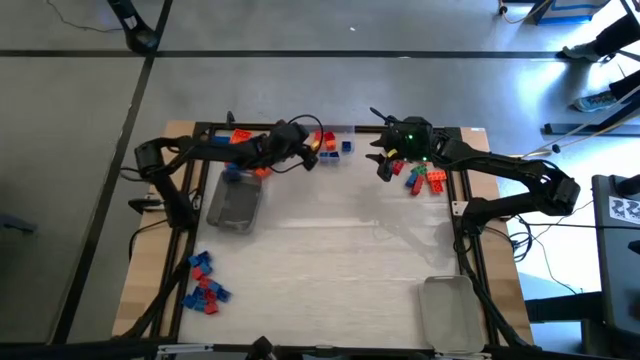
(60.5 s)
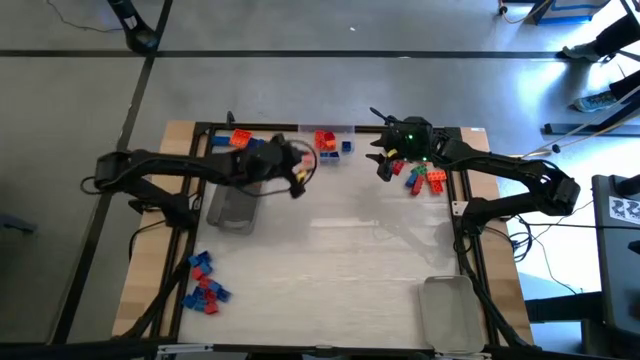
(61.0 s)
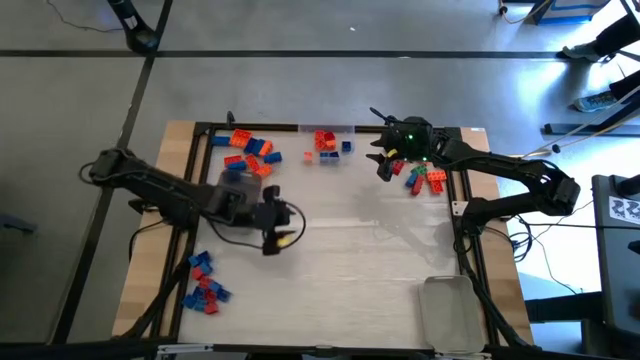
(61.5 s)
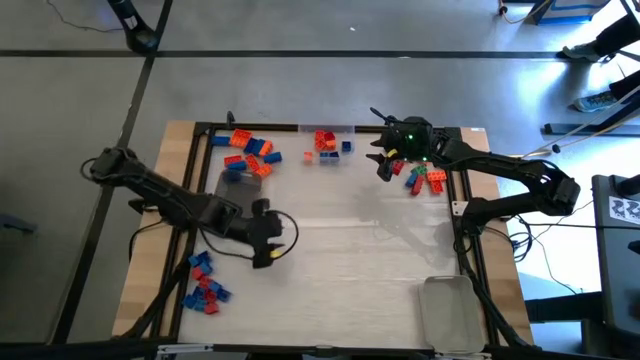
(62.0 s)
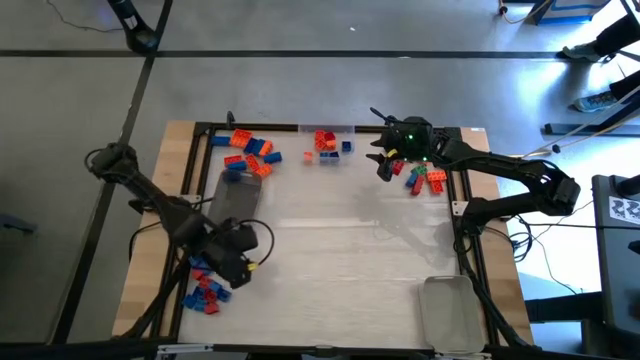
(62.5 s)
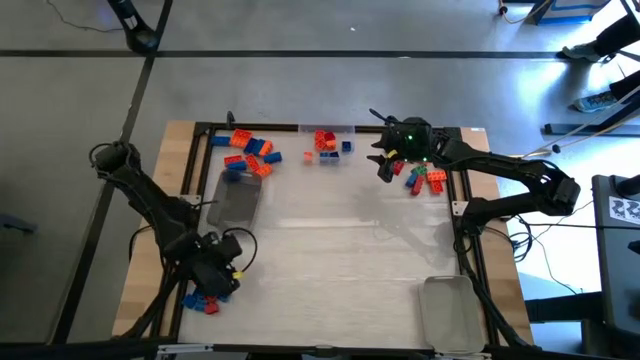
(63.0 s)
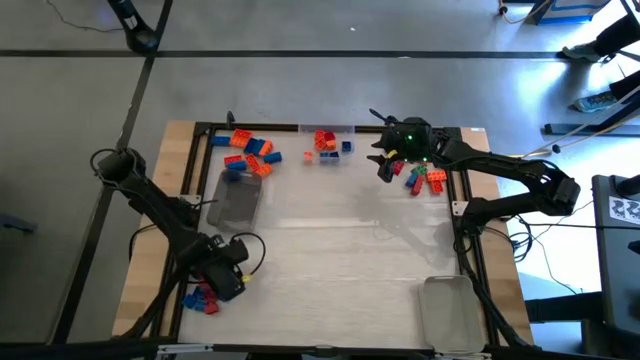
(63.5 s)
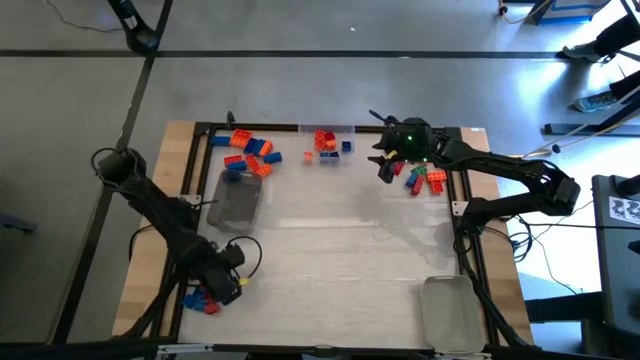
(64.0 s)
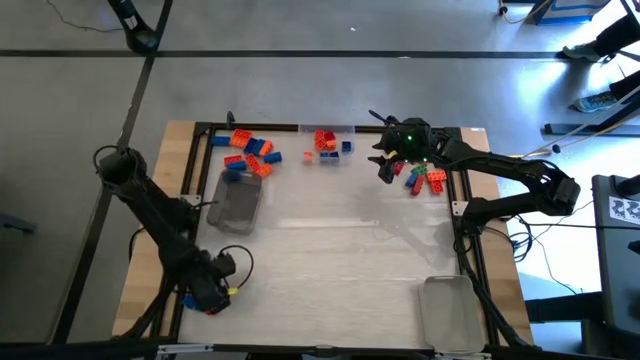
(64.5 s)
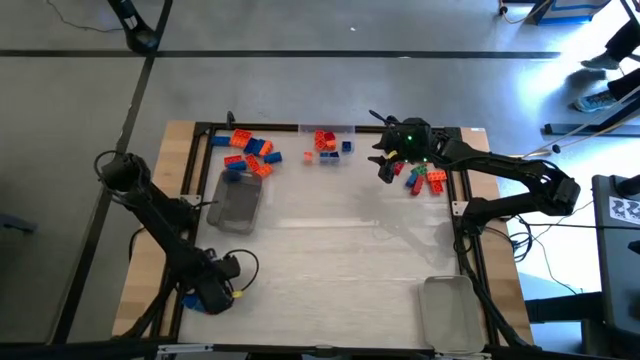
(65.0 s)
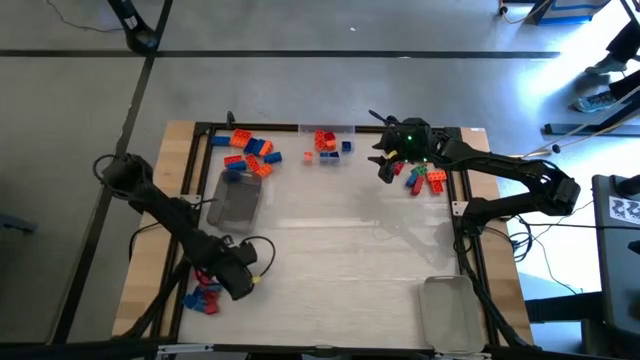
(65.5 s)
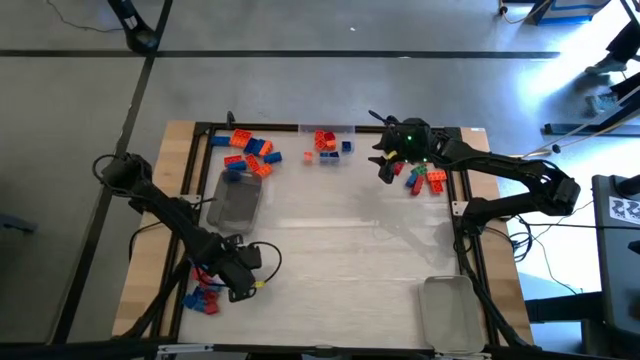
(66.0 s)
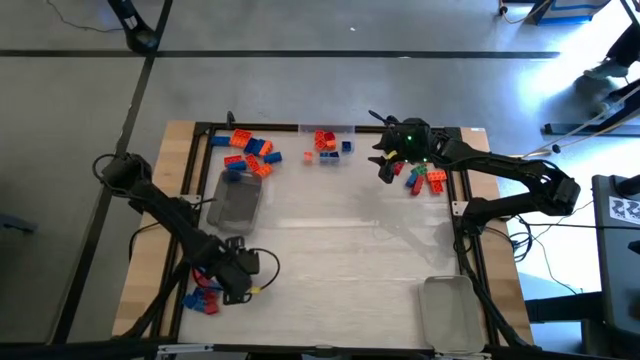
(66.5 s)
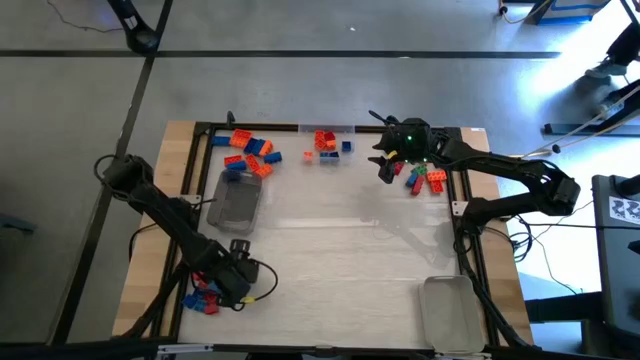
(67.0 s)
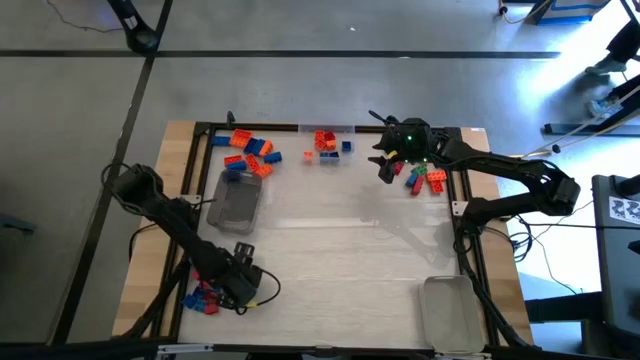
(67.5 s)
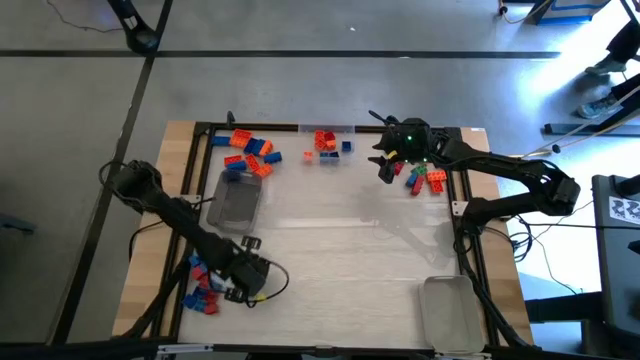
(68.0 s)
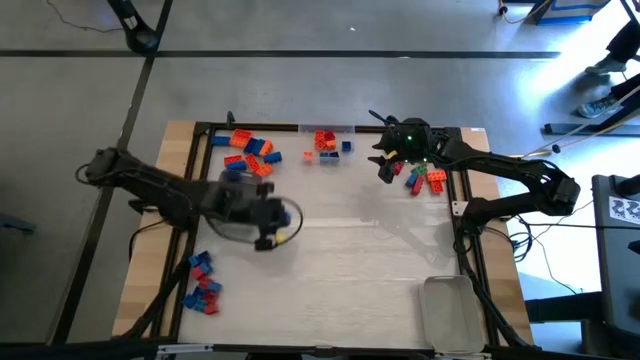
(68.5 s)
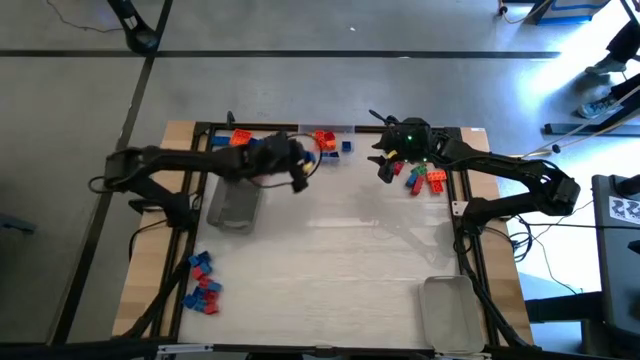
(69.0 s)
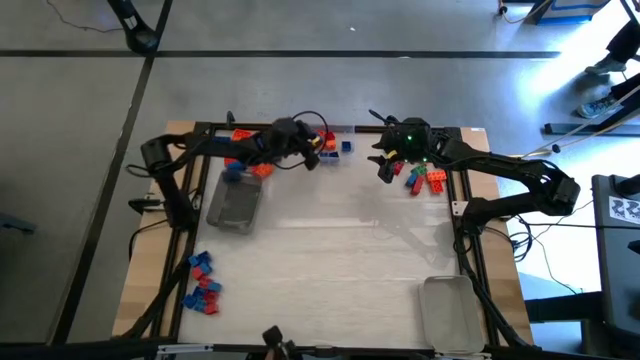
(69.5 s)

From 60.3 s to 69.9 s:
Task: Sort blocks by size
Put the blue 4 stud game piece into the transparent bin

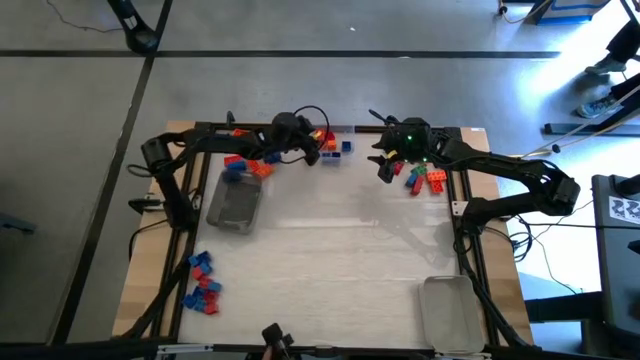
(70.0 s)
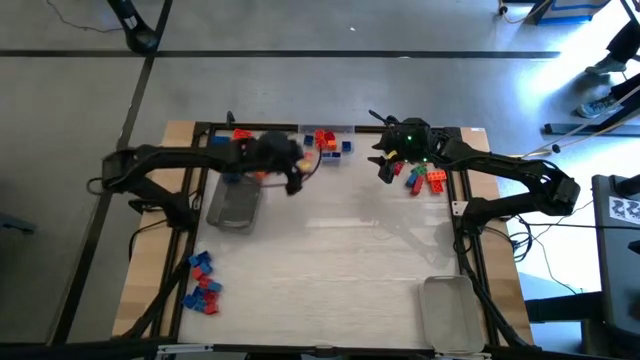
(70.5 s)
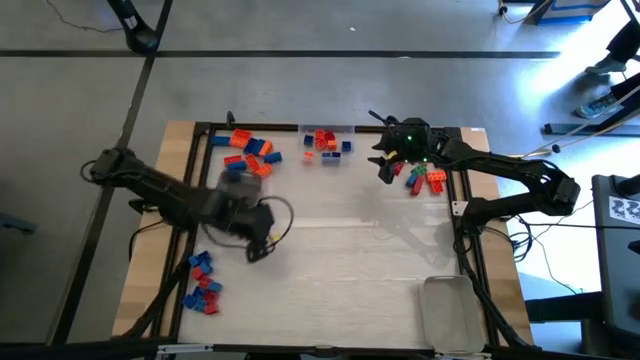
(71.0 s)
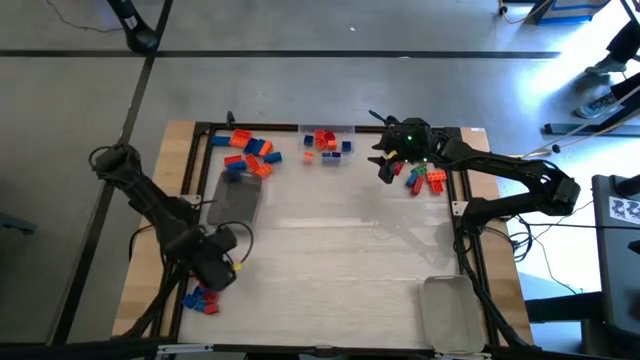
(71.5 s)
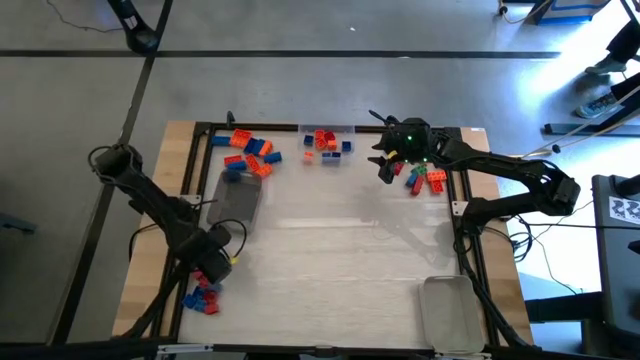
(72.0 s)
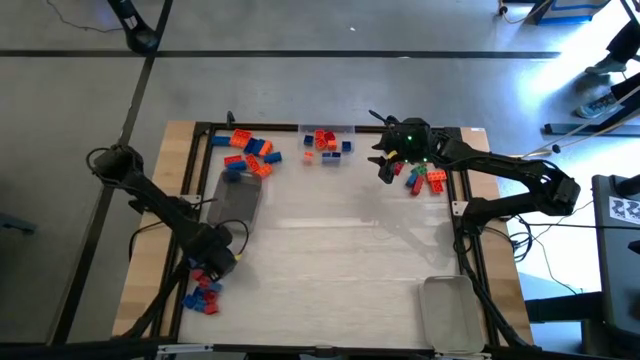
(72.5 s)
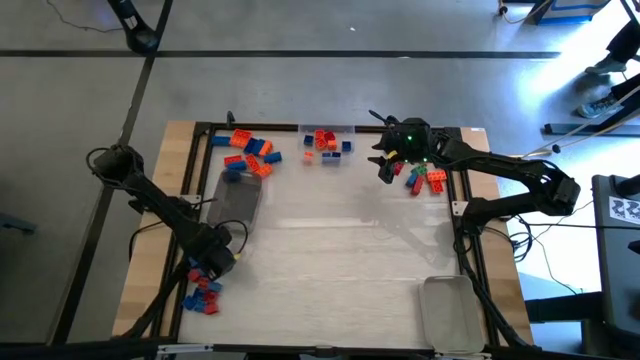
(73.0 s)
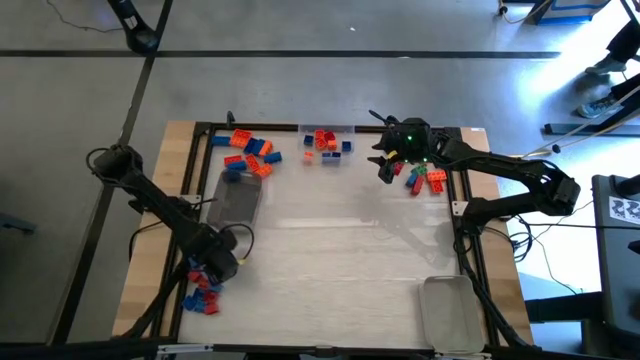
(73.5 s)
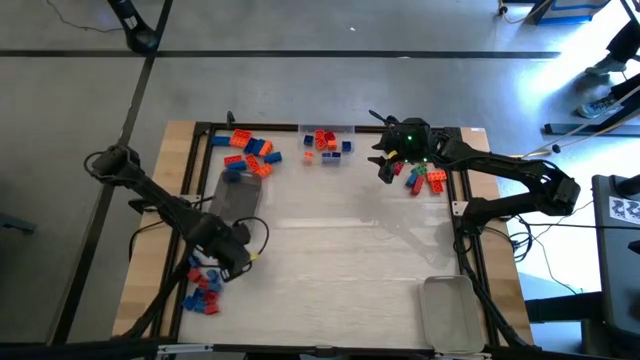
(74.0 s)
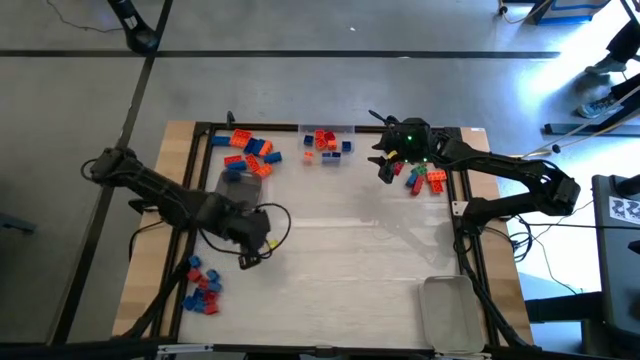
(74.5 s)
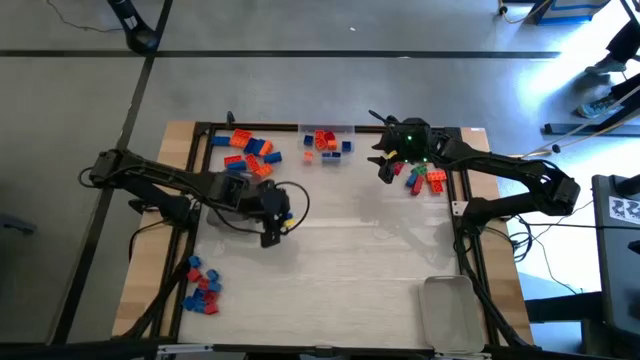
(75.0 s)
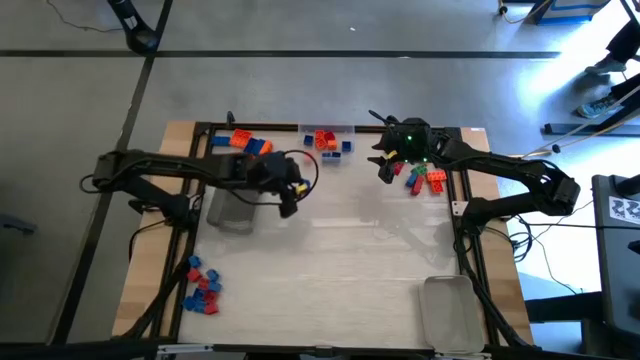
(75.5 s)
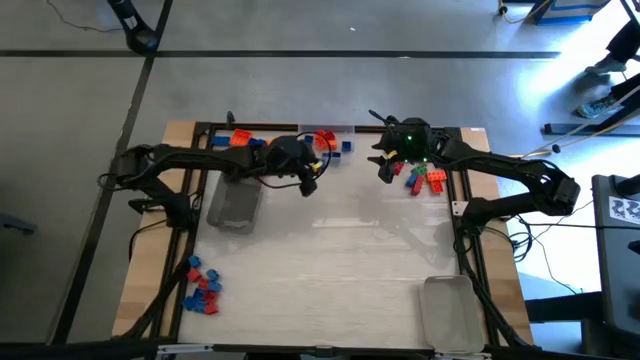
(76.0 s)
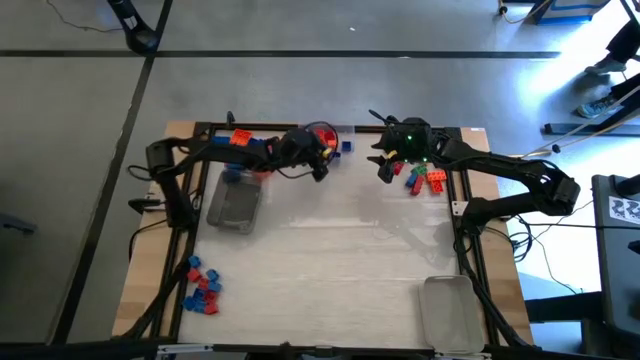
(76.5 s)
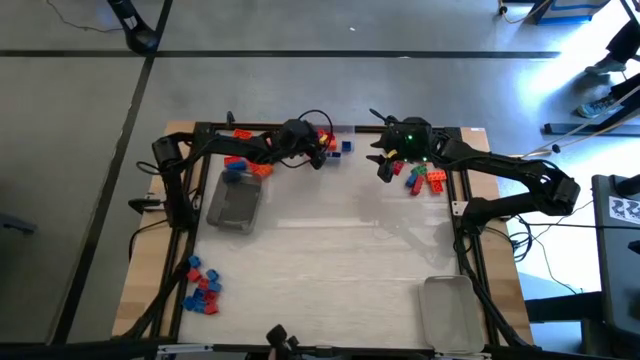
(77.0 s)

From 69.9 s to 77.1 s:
Put the blue 4 stud game piece into the transparent bin

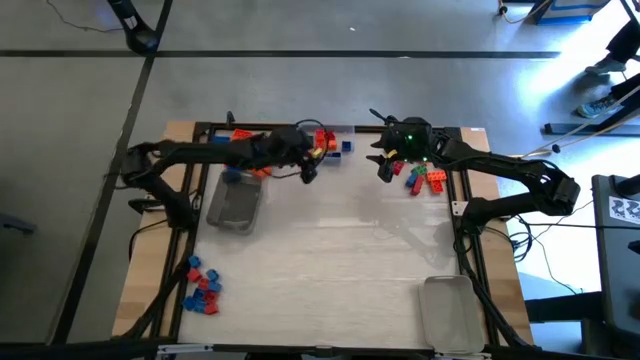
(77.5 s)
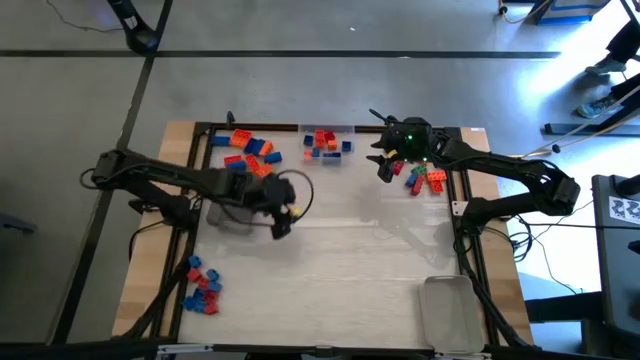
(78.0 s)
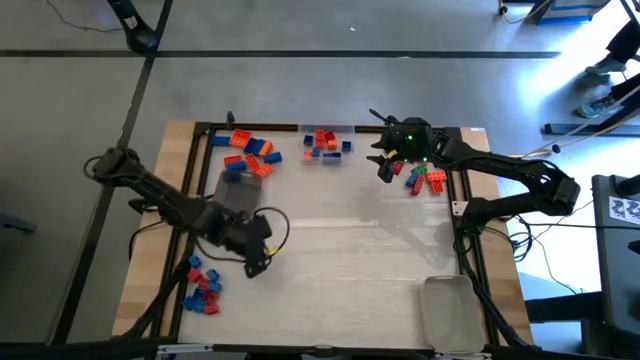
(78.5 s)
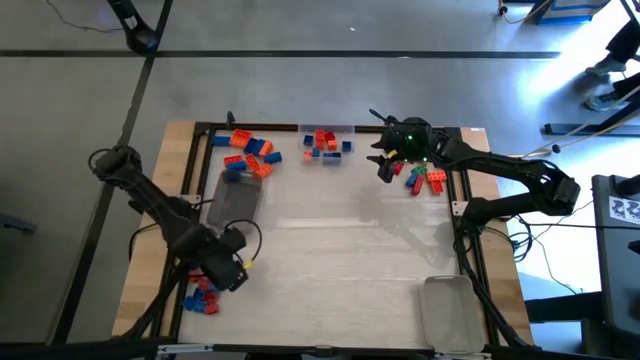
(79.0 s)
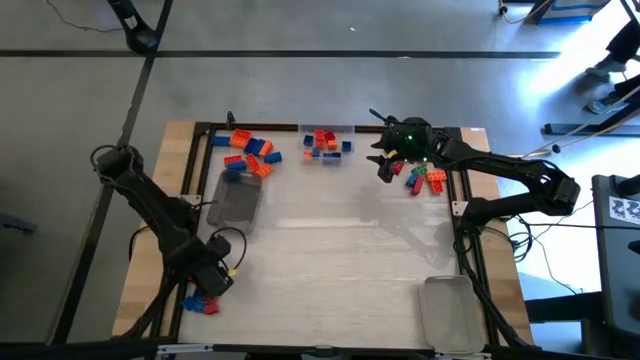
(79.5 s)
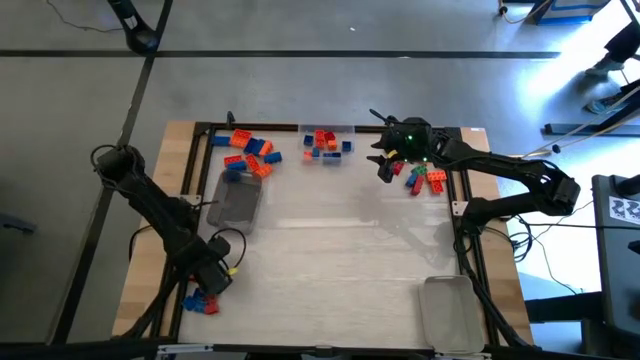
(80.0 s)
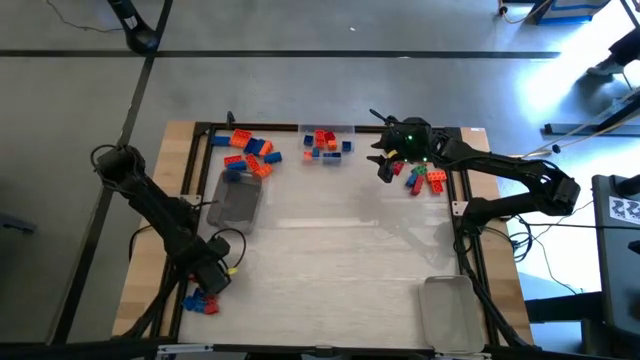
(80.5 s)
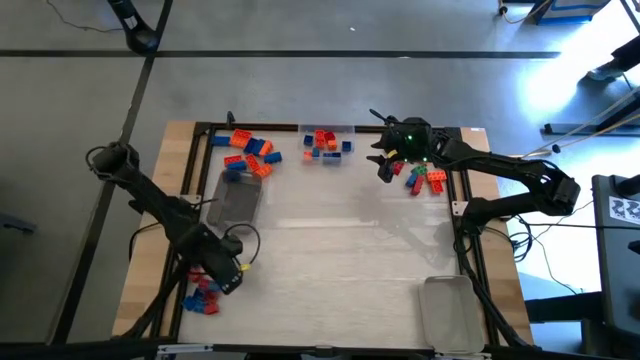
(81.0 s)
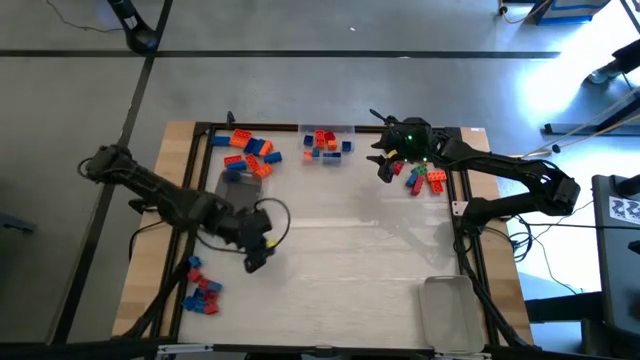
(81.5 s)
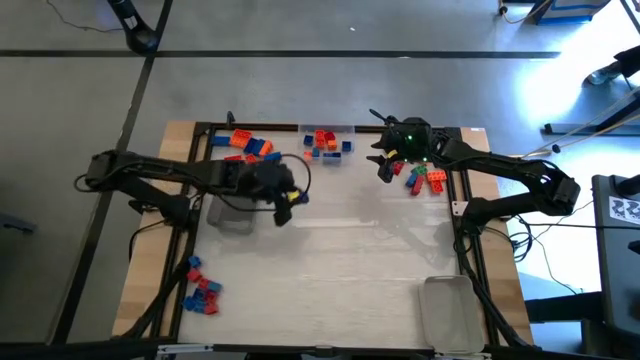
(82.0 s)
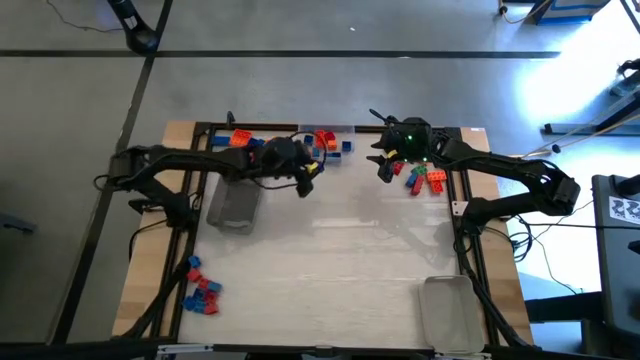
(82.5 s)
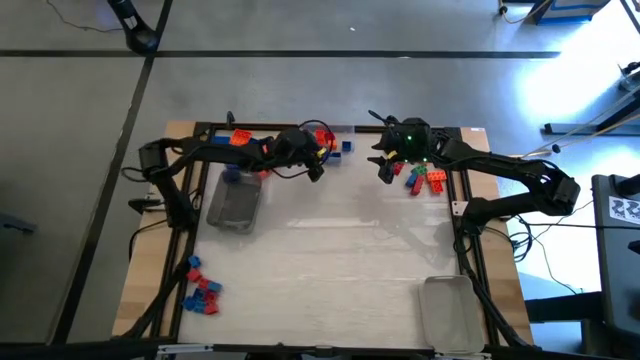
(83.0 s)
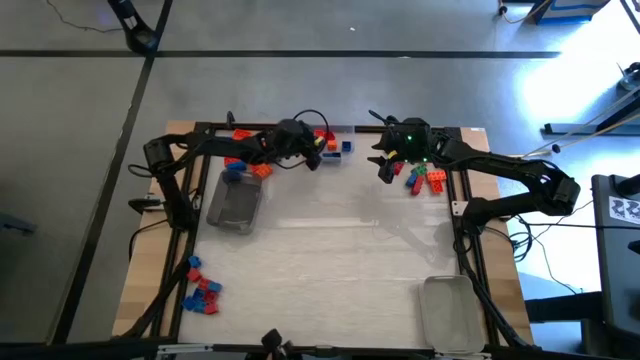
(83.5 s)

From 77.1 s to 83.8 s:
Put the blue 4 stud game piece into the transparent bin
